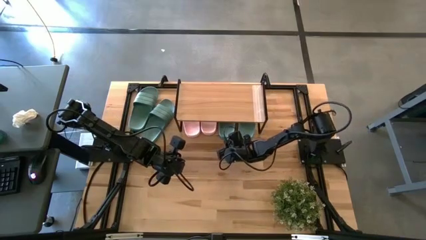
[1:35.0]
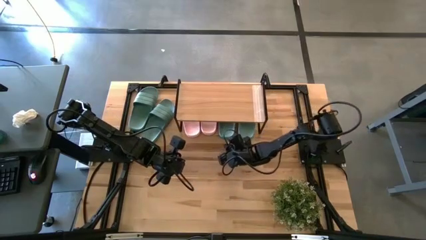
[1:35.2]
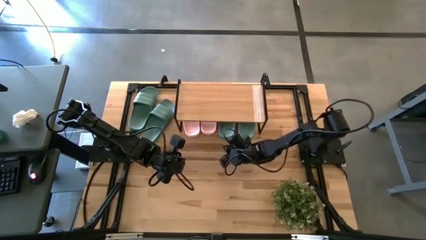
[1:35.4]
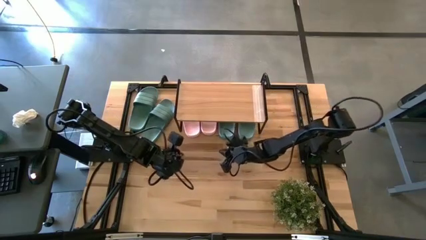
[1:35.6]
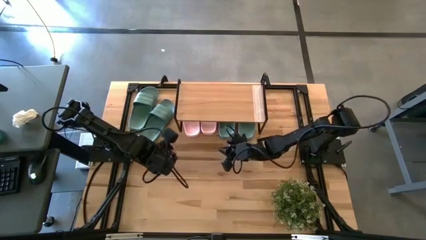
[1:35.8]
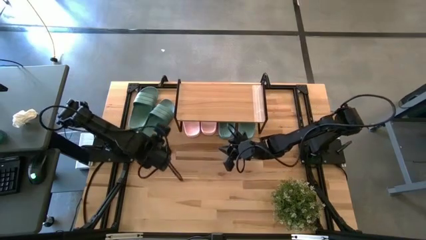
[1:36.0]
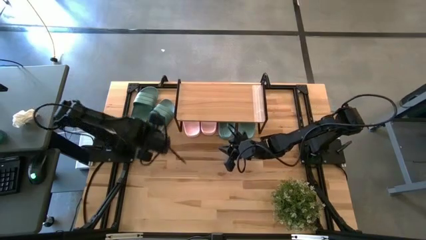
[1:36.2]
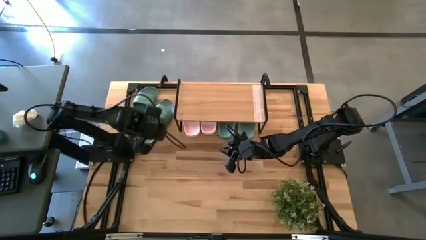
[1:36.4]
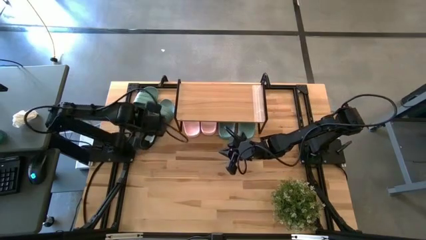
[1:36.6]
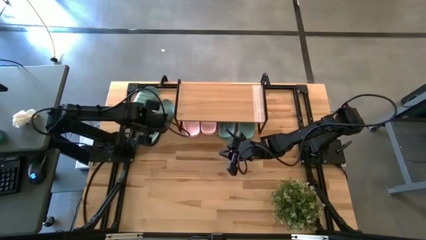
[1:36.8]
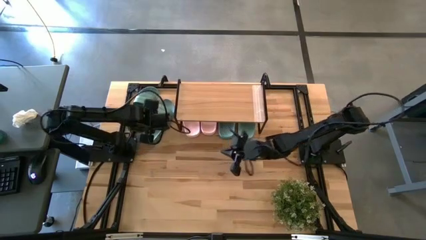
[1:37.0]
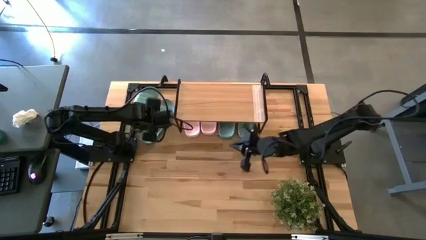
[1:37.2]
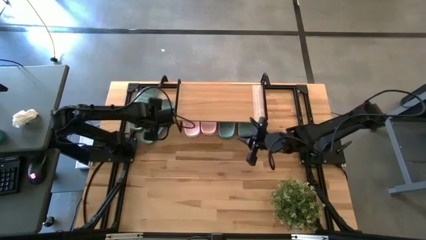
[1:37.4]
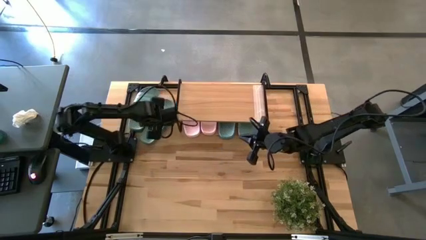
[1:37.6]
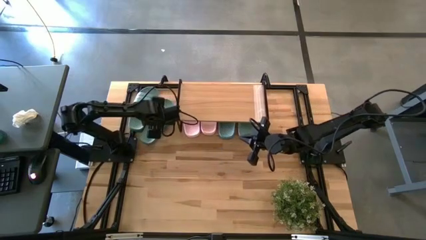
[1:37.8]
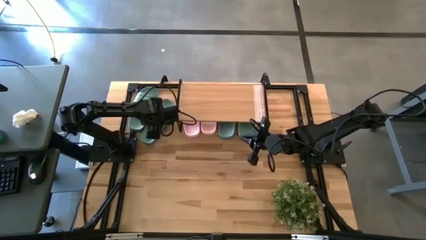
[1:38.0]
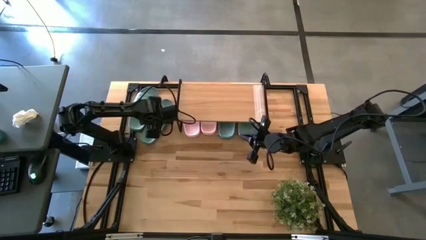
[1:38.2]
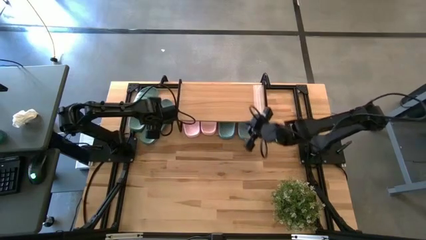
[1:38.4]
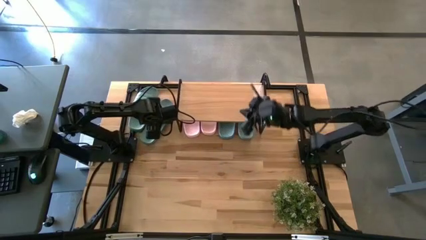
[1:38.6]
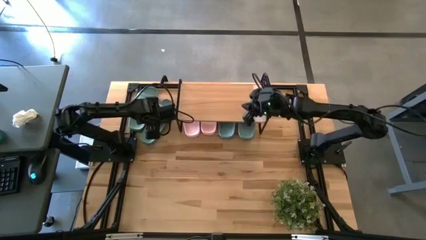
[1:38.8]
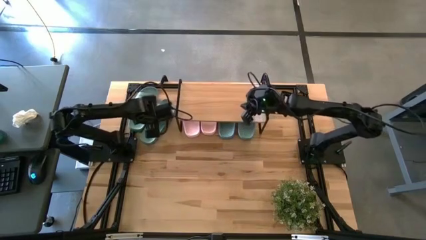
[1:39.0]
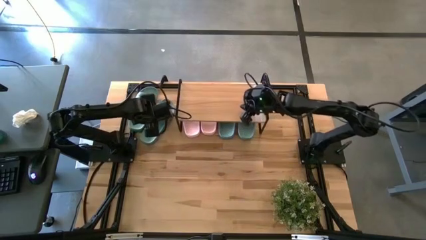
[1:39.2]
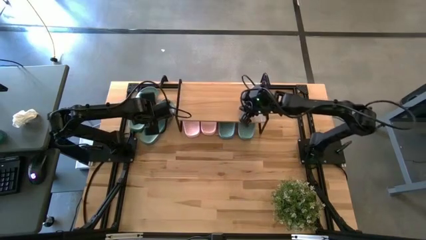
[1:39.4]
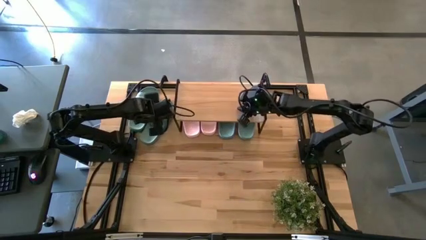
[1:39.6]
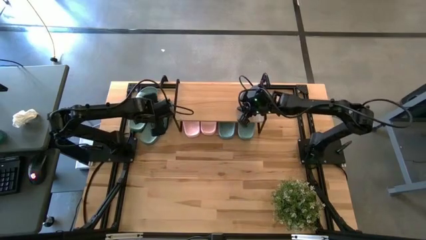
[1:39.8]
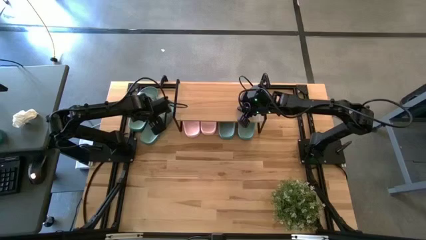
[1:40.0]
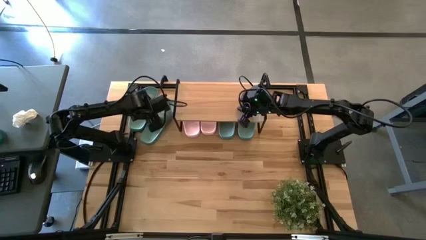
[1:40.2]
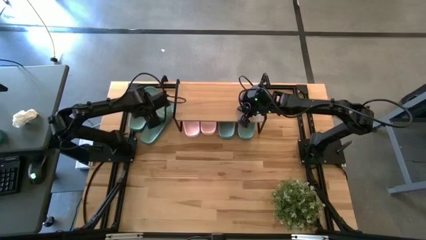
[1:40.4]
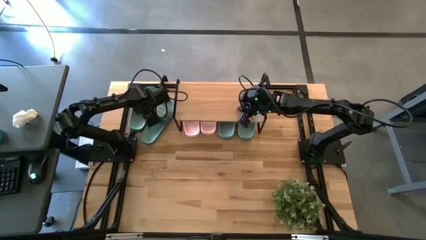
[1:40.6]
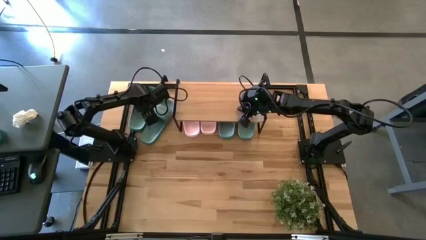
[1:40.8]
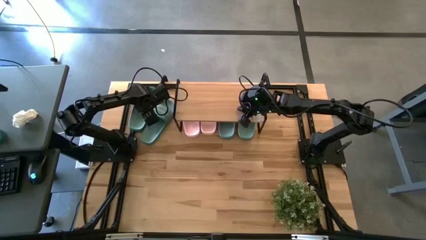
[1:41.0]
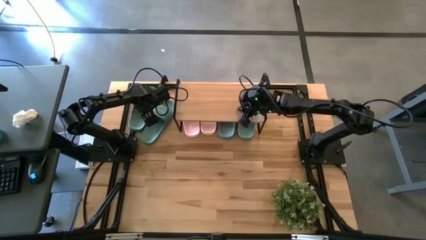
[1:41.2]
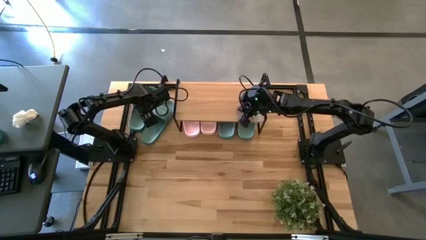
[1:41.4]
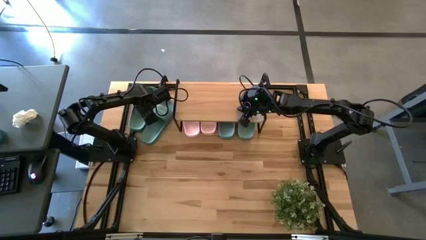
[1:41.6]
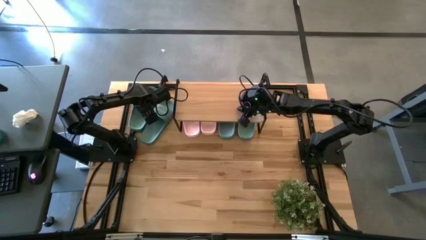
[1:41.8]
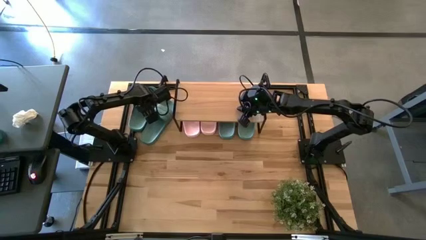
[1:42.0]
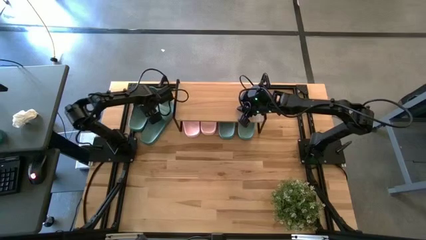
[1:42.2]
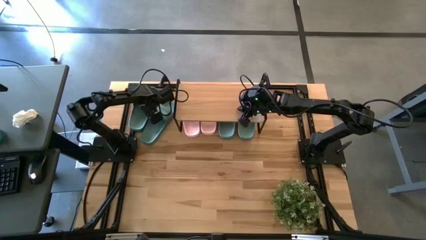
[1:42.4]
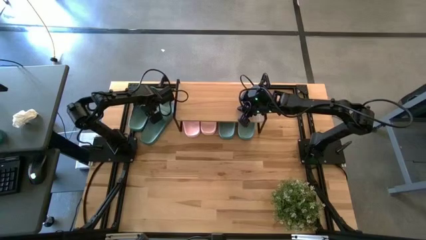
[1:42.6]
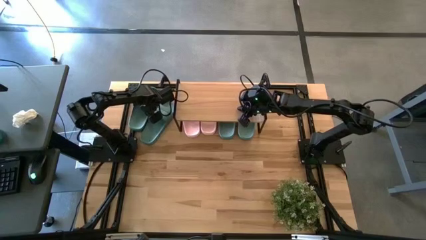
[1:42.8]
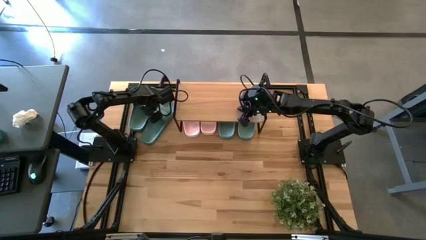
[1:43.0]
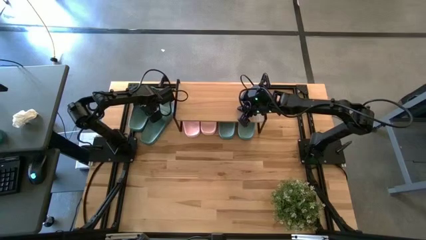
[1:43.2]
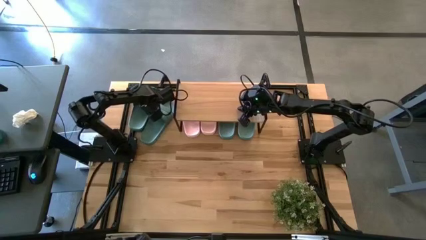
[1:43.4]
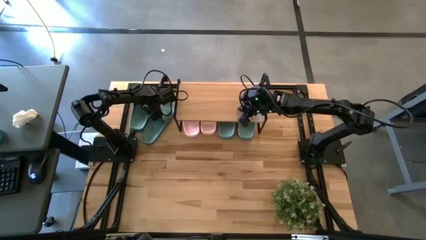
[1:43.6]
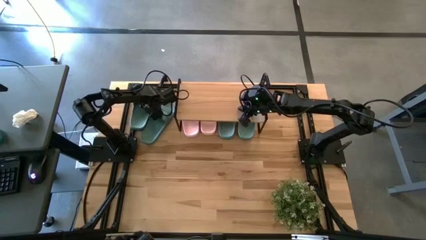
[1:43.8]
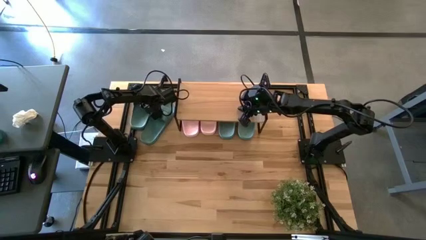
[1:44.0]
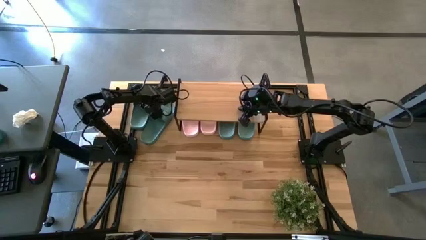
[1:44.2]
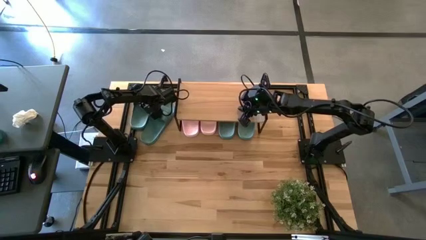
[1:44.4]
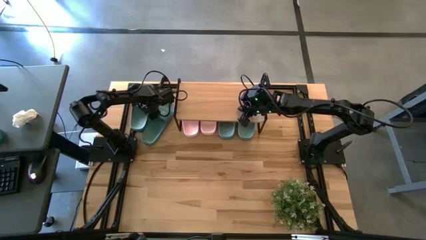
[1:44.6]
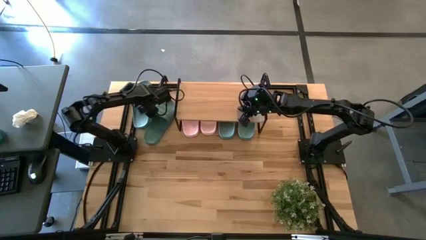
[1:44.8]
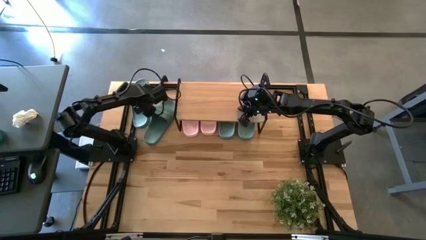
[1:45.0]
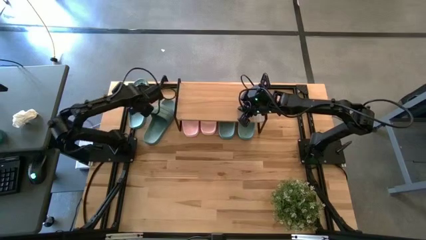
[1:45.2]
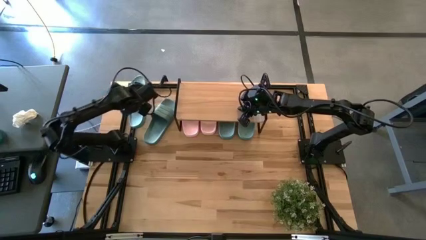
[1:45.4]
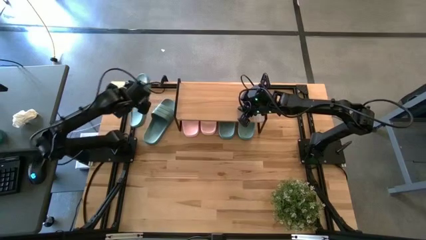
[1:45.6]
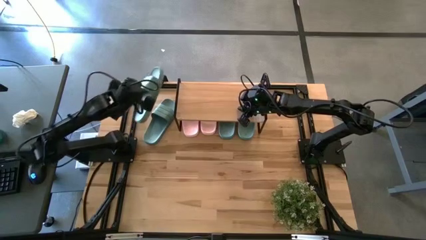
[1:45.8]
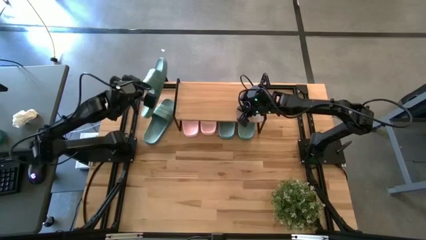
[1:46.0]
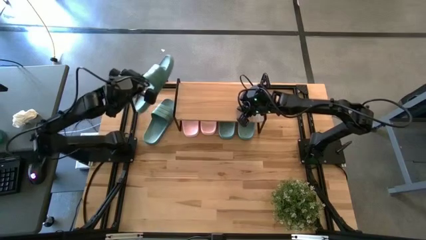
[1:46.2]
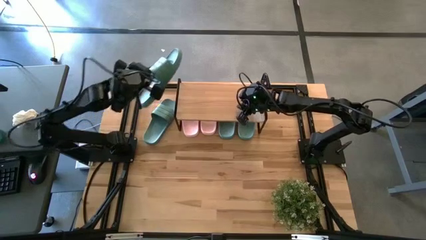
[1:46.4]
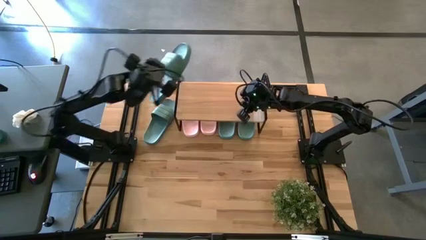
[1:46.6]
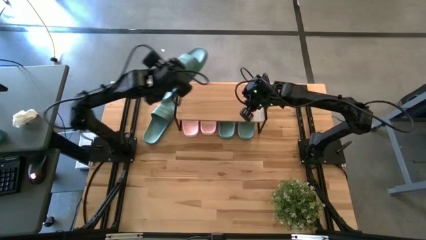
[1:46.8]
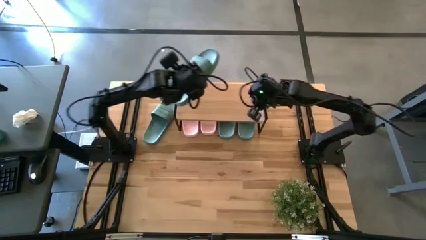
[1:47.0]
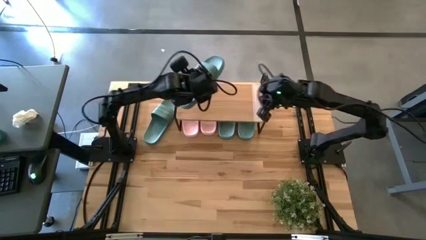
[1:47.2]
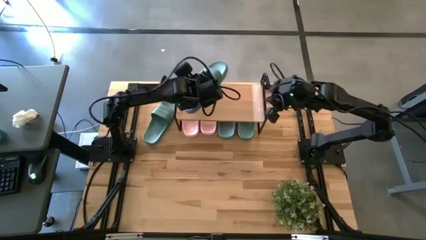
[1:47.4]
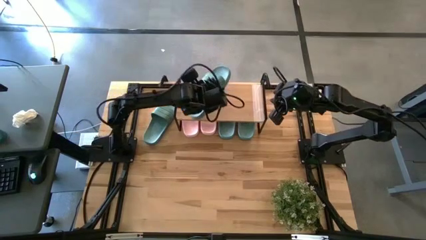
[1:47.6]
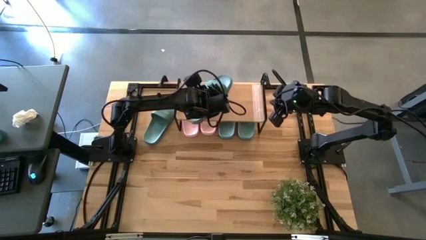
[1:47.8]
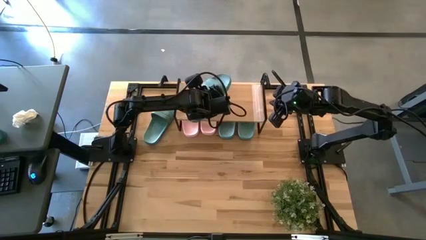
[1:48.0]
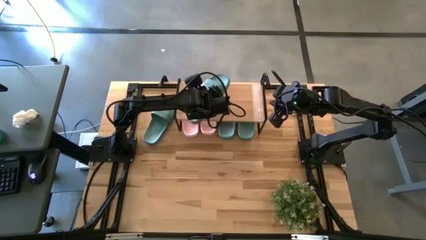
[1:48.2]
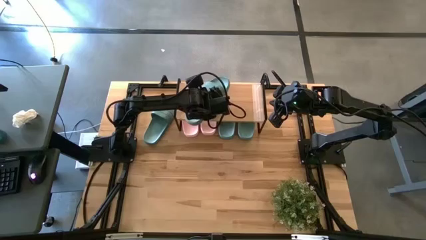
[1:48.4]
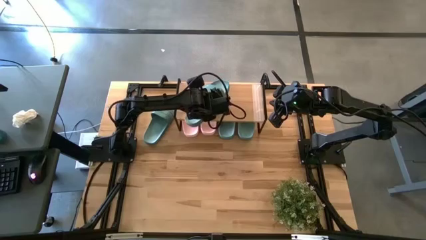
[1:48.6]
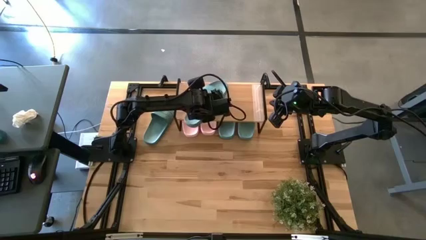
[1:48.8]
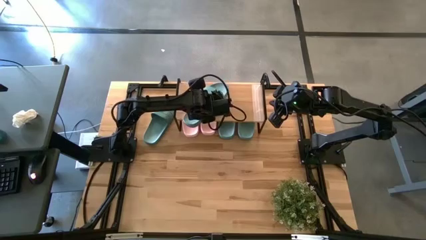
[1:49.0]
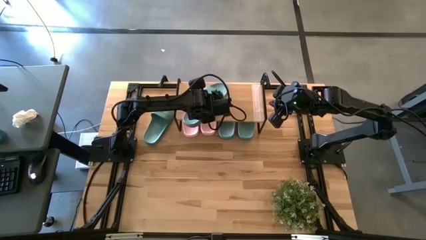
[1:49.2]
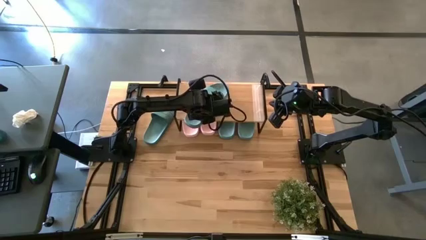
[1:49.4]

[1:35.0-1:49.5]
Task: Pick and place slides into the shelf
Put the green slide on the shelf
